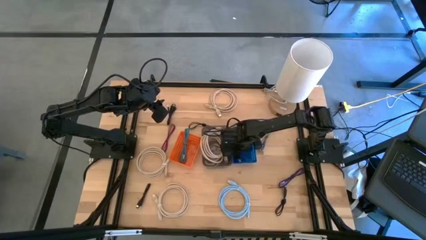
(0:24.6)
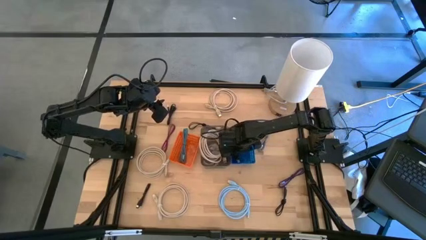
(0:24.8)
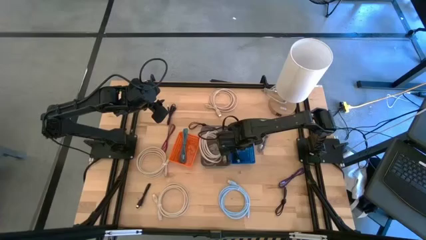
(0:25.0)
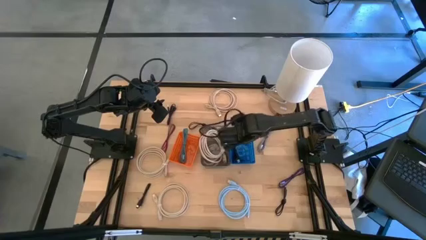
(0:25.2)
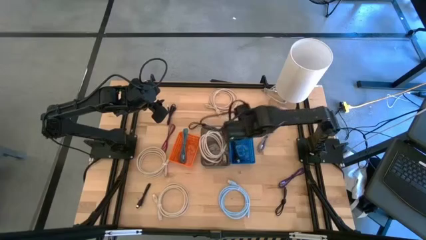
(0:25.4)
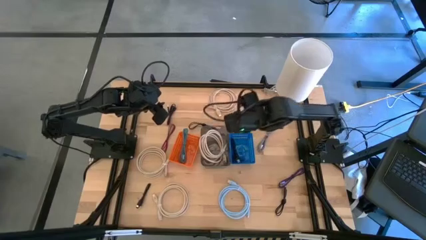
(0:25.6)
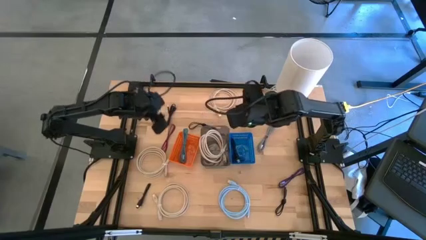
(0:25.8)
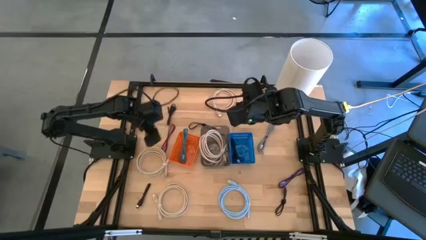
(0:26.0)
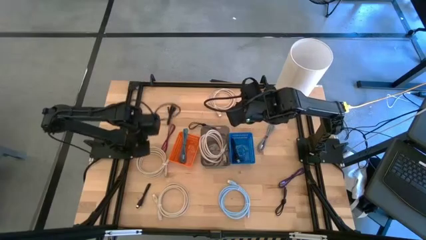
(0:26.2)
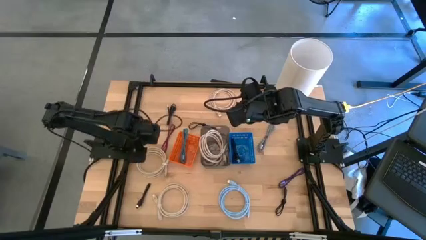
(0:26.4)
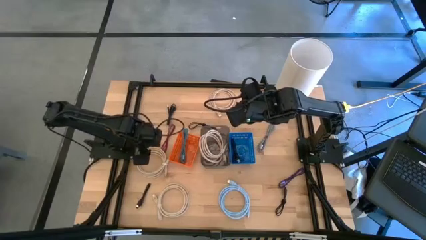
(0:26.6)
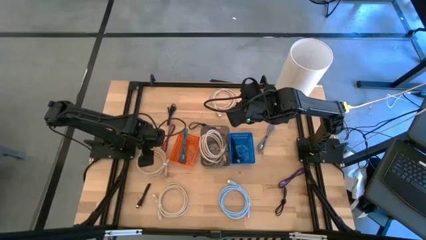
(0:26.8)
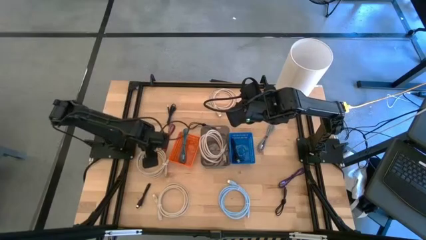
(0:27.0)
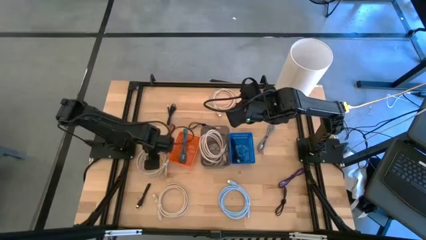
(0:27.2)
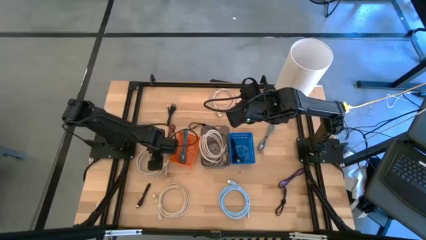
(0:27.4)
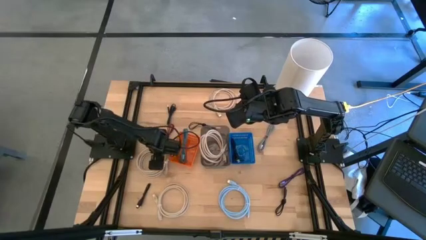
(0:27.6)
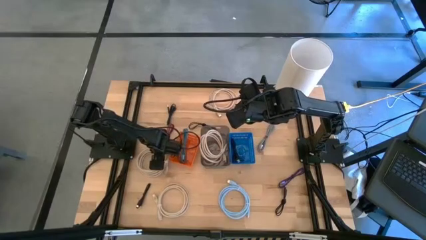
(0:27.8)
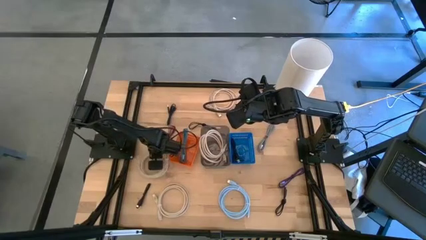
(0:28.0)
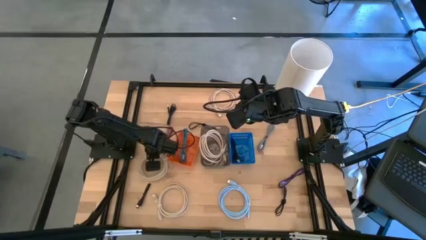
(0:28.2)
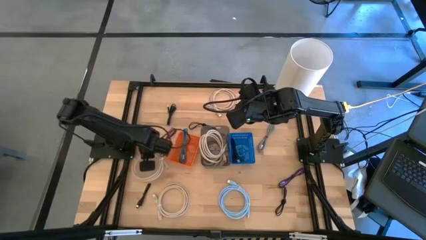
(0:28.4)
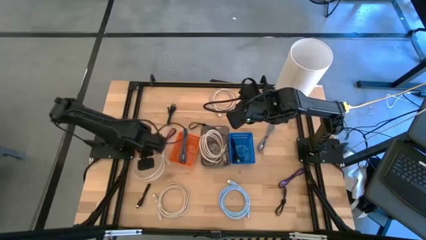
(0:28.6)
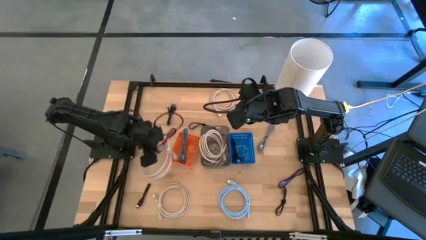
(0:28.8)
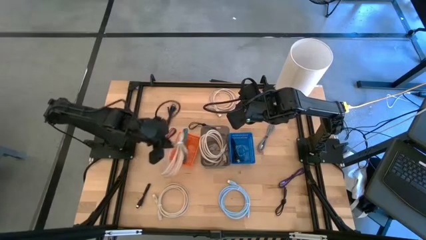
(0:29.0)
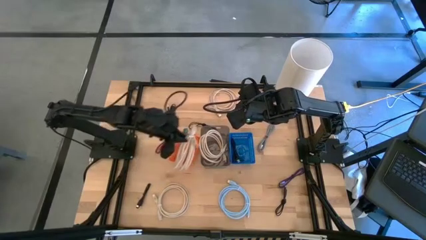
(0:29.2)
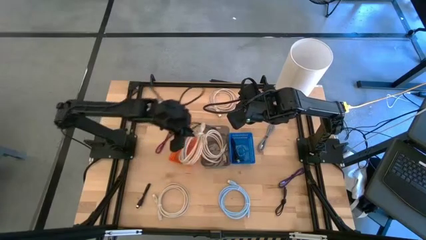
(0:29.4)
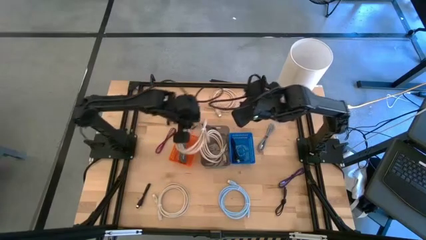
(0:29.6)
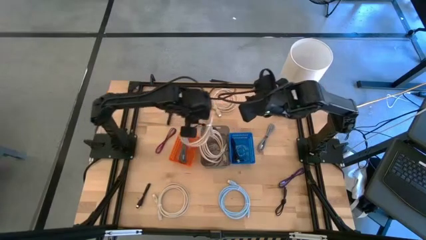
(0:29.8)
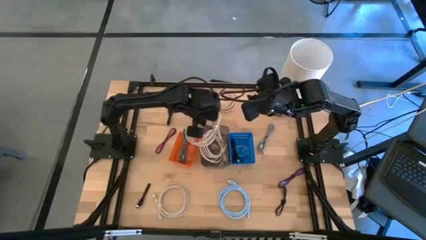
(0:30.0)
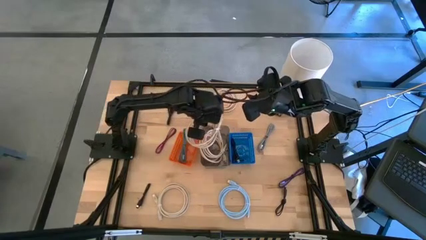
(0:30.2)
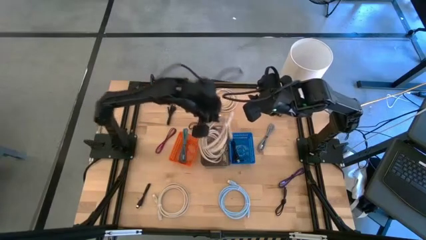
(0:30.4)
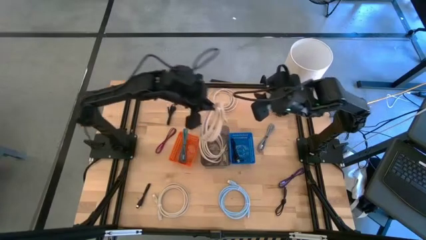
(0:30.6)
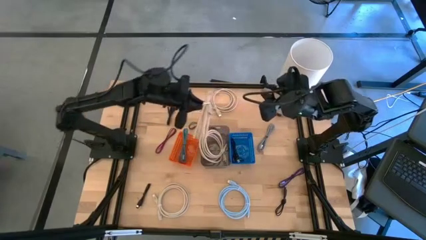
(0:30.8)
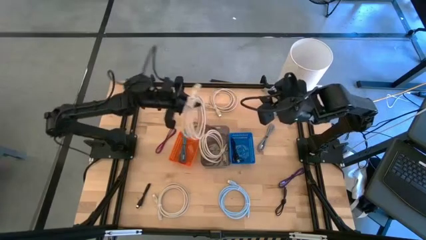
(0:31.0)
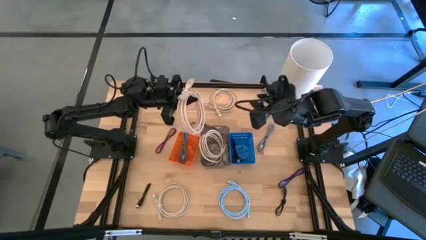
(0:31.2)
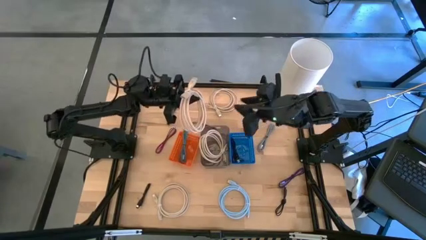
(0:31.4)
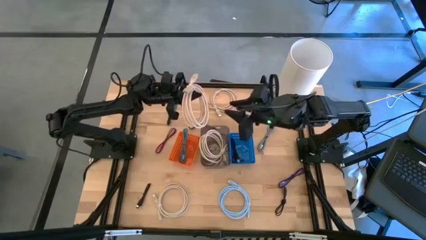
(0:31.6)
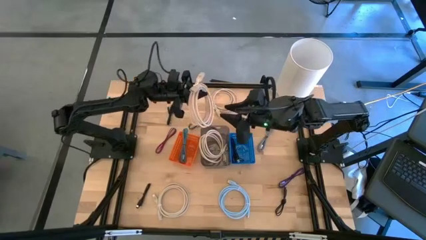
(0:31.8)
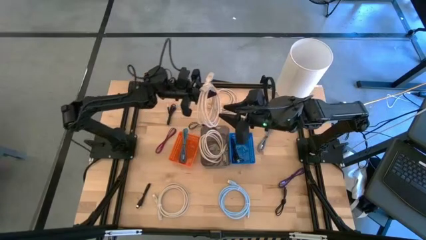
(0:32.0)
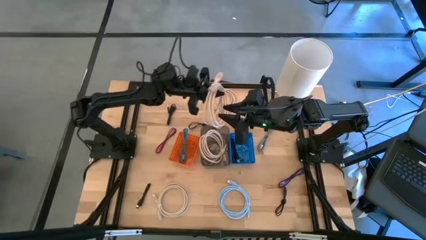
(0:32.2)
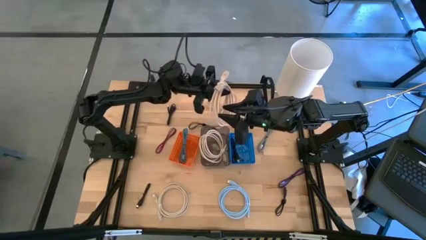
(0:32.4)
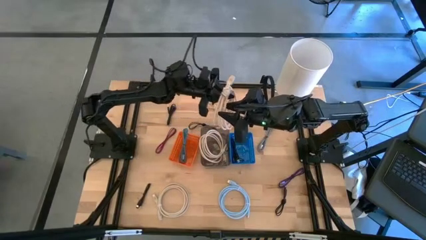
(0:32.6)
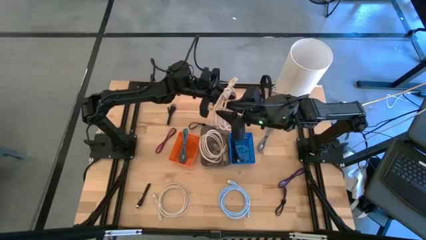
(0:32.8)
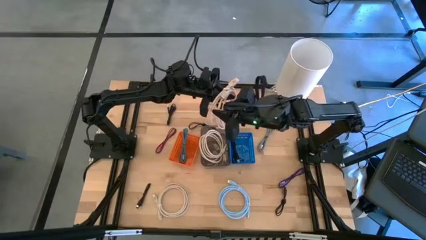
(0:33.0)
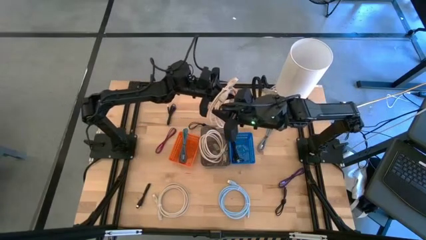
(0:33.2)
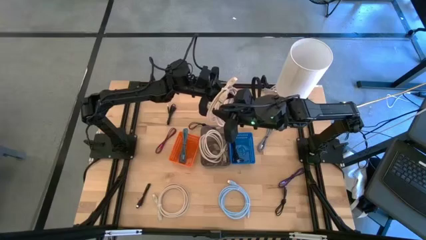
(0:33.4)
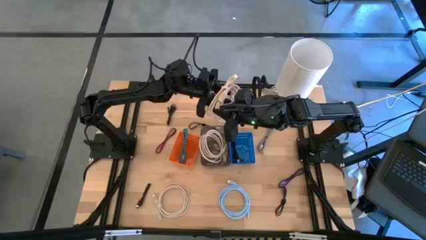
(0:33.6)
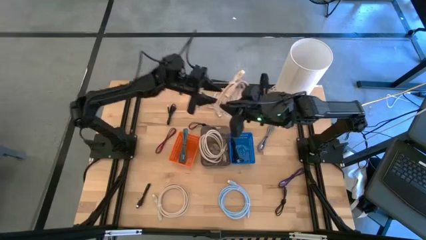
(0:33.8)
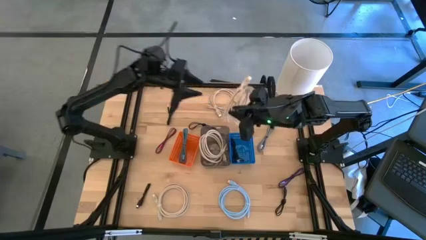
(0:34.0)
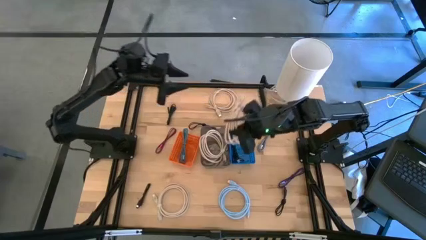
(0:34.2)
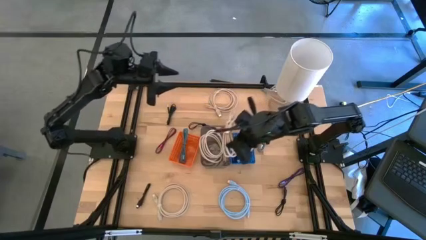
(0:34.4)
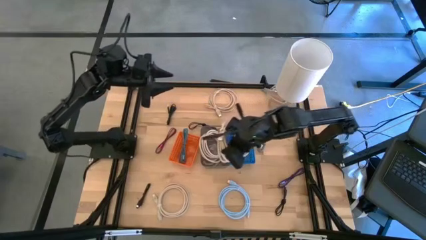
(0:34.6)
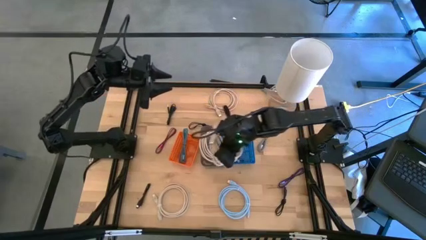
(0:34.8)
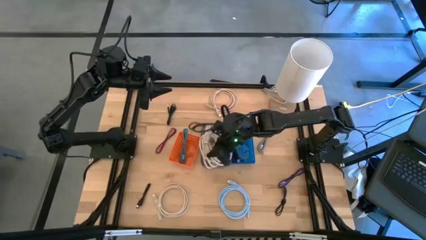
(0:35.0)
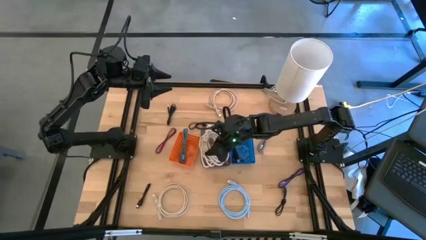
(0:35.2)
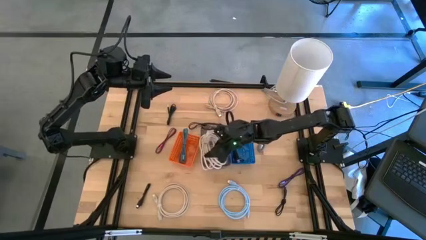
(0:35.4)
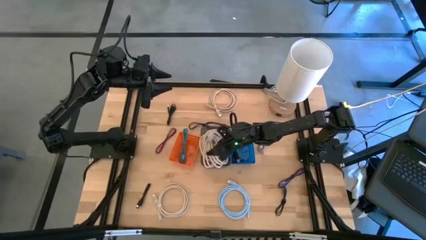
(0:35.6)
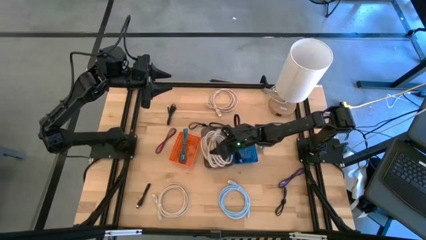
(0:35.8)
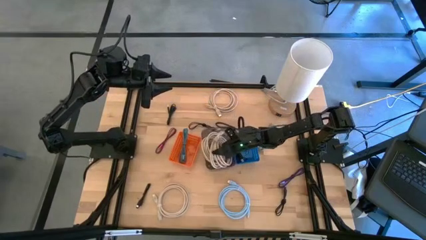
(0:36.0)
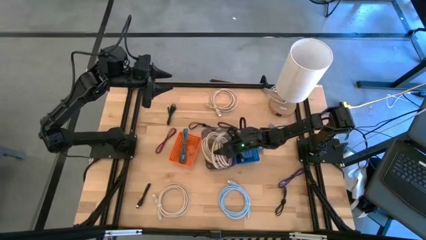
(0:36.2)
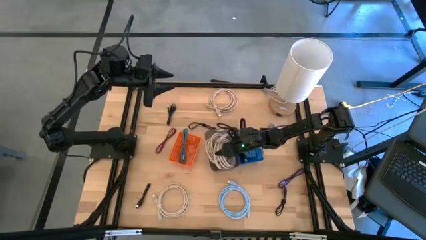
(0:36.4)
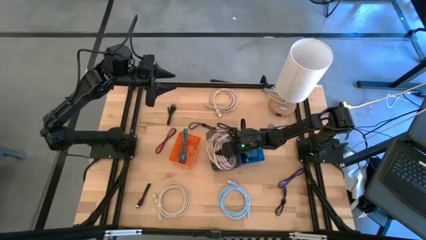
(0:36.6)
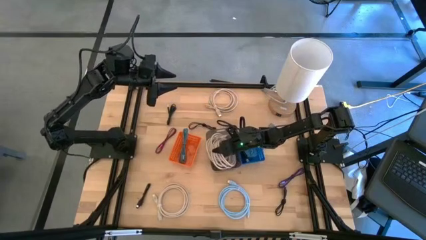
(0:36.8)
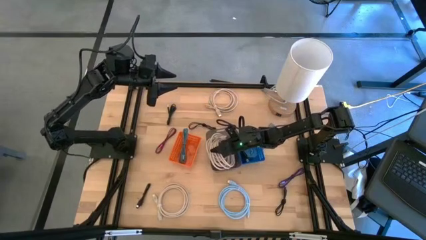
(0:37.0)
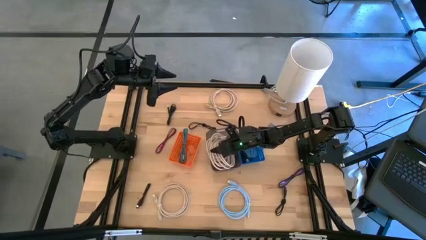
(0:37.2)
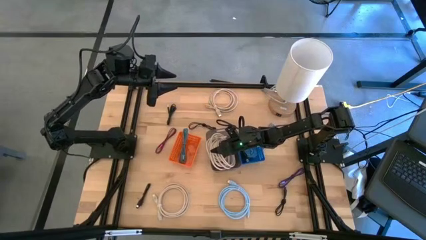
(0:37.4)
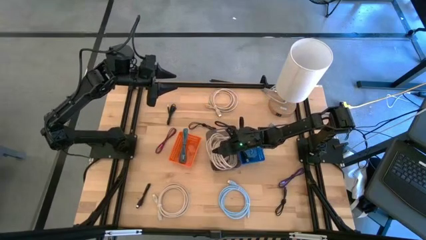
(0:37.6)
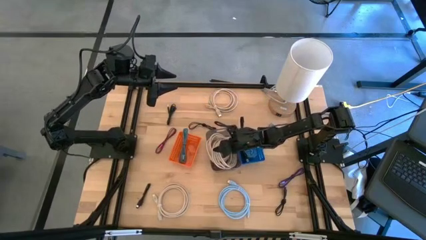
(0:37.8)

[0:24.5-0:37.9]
Task: Pick & Place USB Port
Put the light brown HDMI cable into the black bin
